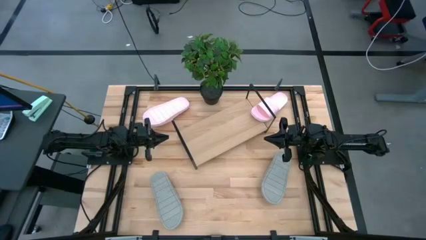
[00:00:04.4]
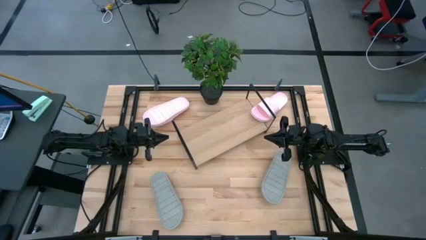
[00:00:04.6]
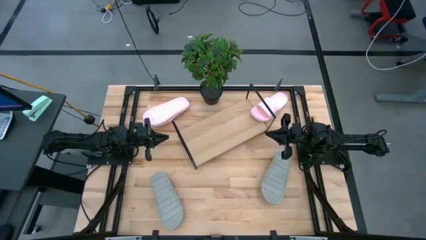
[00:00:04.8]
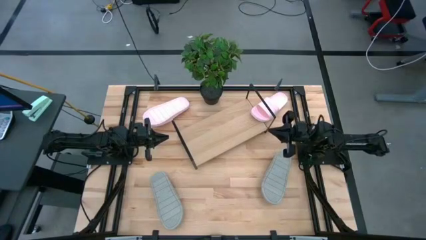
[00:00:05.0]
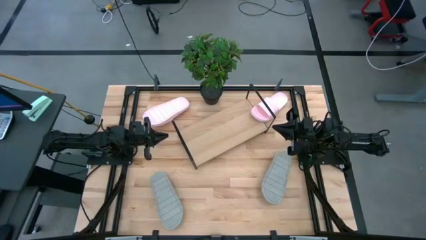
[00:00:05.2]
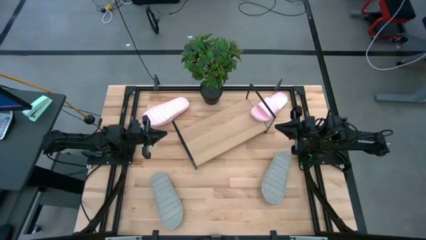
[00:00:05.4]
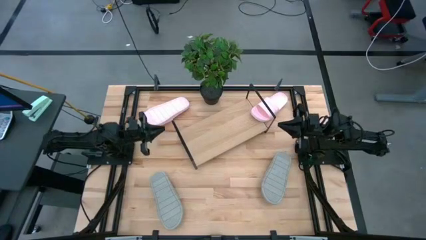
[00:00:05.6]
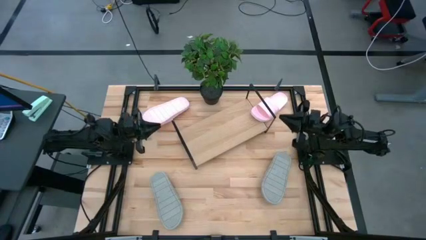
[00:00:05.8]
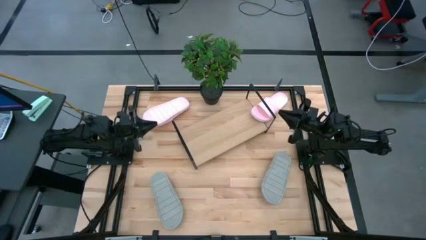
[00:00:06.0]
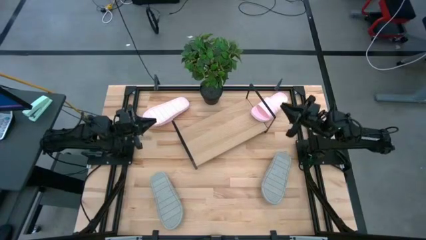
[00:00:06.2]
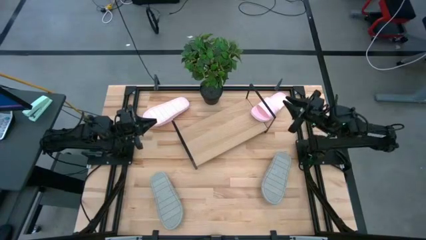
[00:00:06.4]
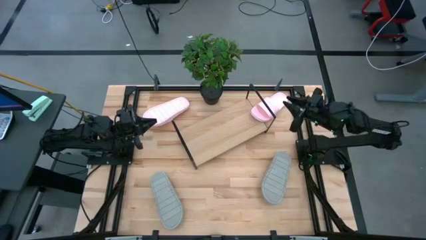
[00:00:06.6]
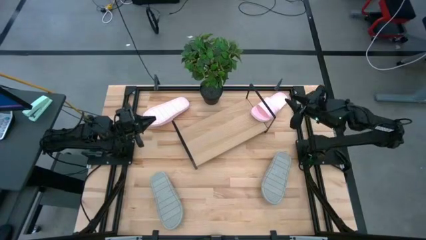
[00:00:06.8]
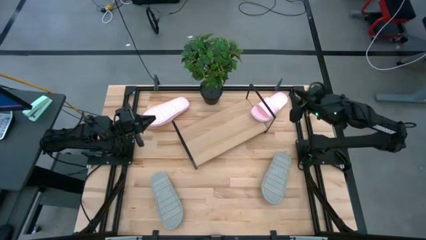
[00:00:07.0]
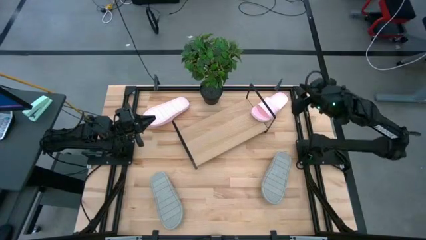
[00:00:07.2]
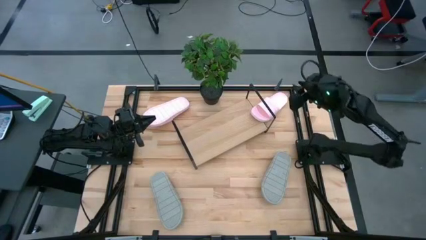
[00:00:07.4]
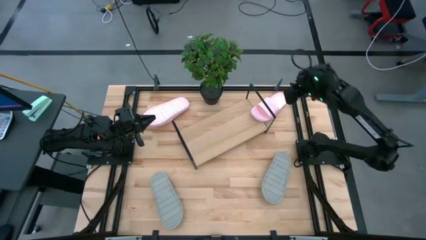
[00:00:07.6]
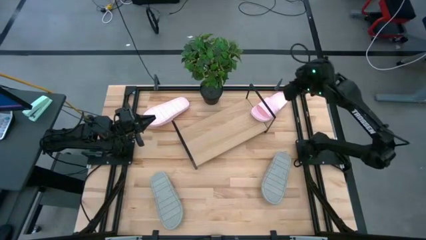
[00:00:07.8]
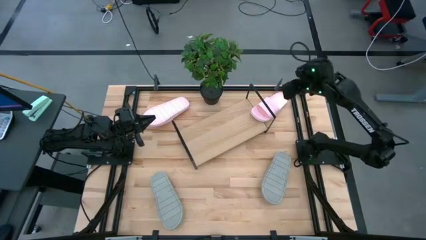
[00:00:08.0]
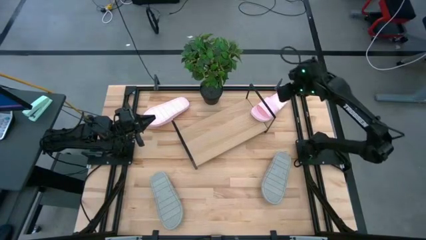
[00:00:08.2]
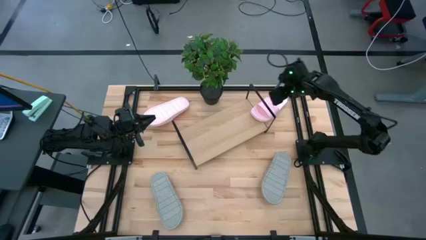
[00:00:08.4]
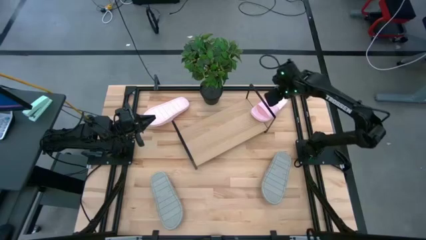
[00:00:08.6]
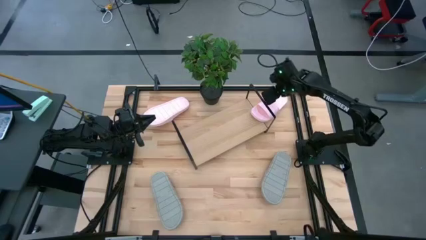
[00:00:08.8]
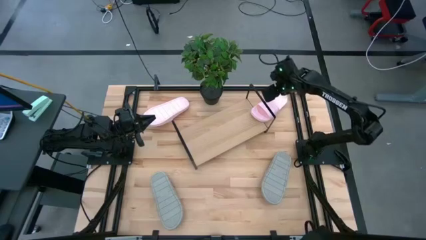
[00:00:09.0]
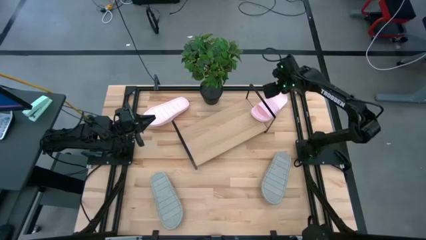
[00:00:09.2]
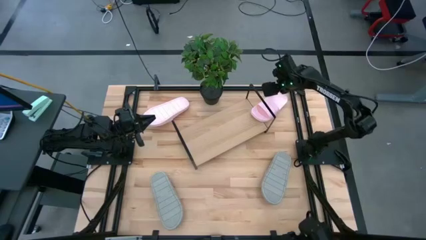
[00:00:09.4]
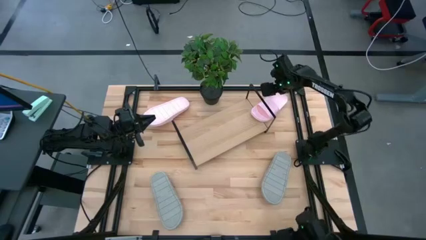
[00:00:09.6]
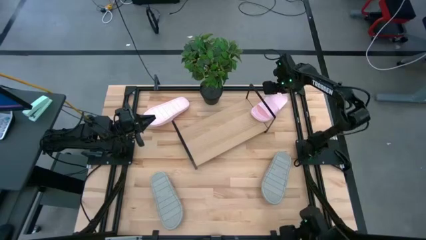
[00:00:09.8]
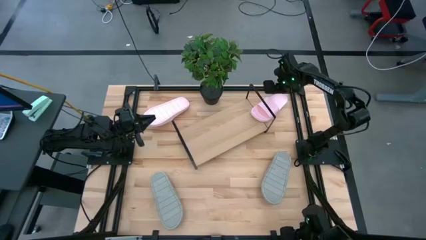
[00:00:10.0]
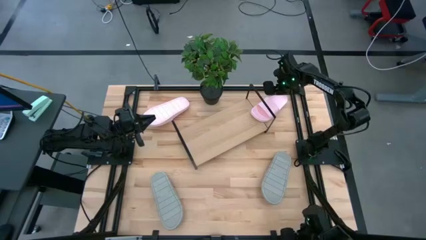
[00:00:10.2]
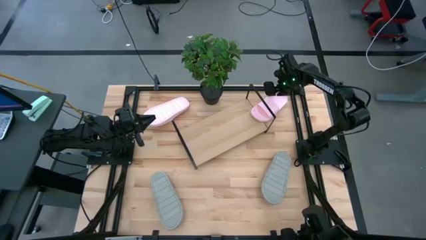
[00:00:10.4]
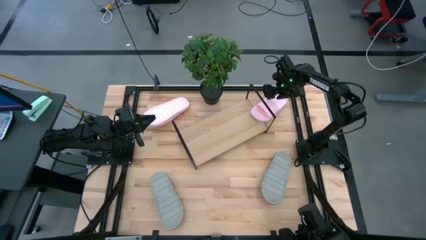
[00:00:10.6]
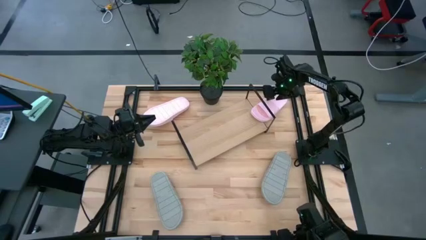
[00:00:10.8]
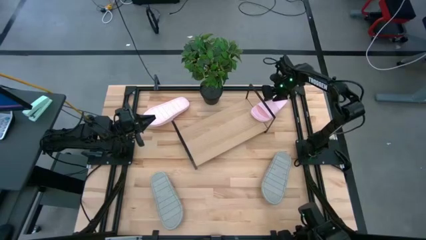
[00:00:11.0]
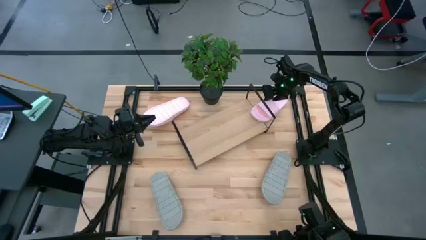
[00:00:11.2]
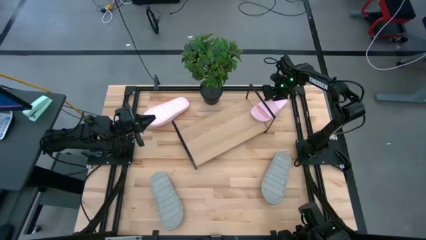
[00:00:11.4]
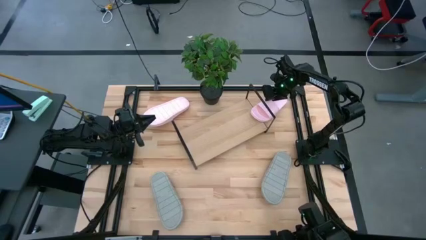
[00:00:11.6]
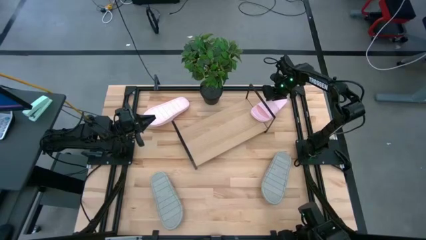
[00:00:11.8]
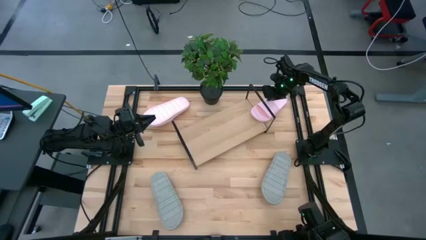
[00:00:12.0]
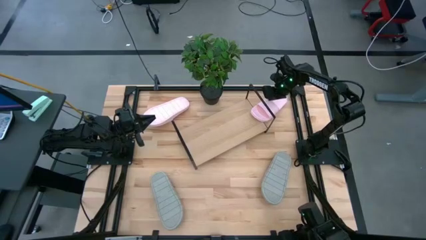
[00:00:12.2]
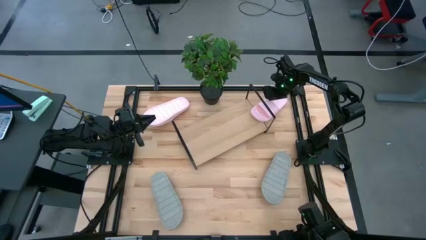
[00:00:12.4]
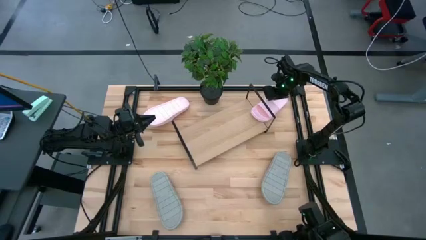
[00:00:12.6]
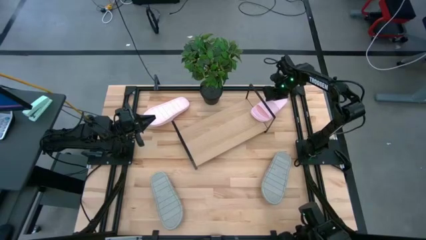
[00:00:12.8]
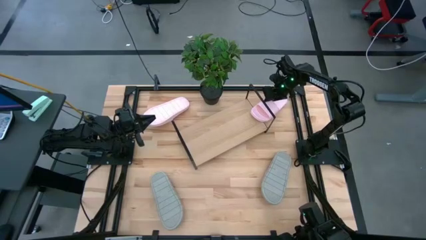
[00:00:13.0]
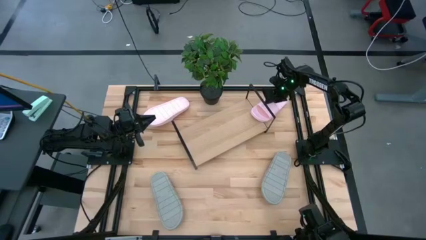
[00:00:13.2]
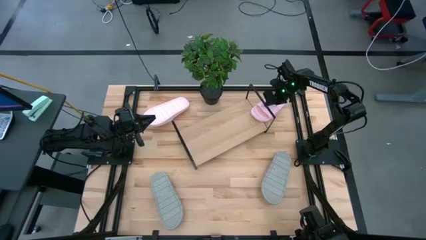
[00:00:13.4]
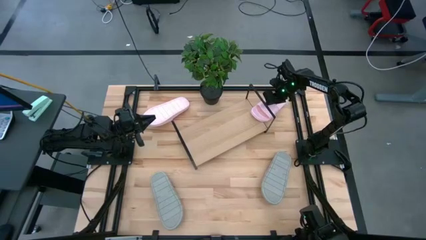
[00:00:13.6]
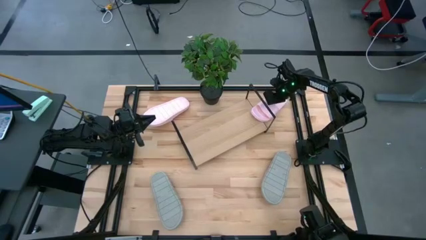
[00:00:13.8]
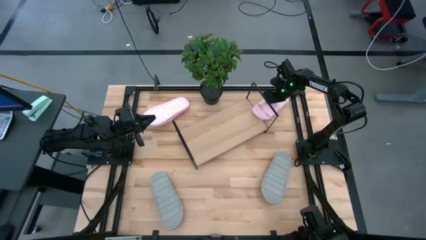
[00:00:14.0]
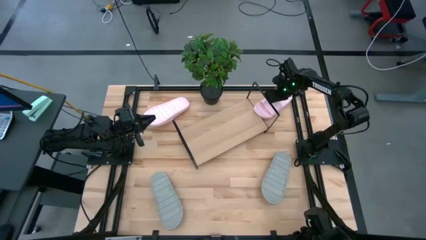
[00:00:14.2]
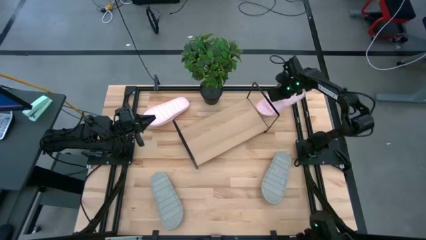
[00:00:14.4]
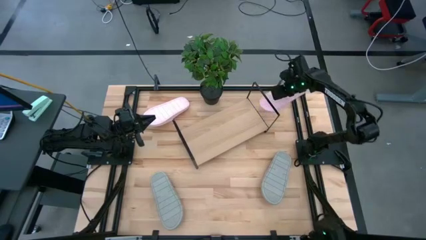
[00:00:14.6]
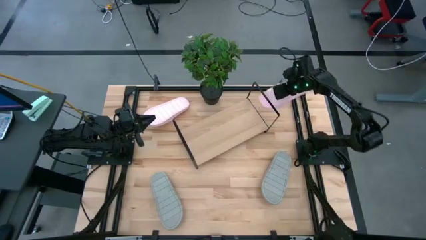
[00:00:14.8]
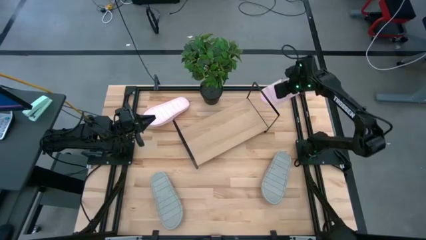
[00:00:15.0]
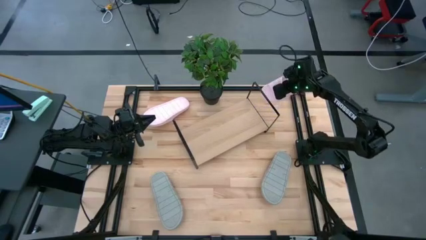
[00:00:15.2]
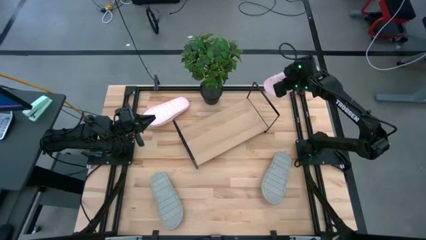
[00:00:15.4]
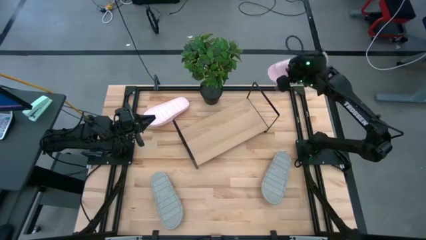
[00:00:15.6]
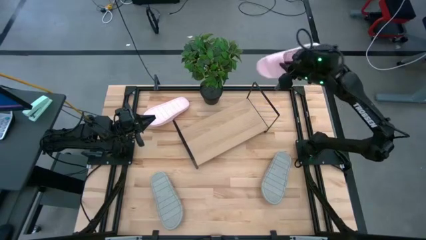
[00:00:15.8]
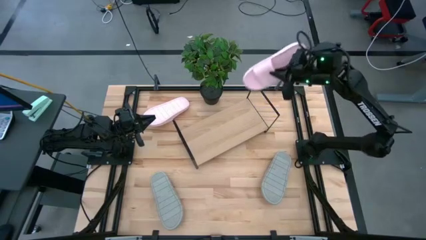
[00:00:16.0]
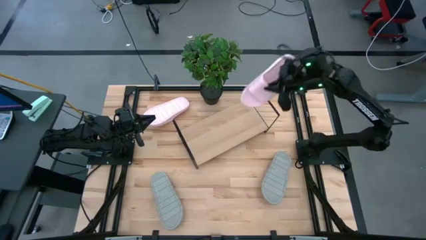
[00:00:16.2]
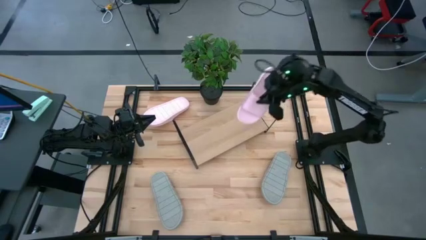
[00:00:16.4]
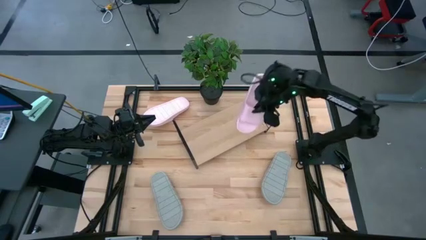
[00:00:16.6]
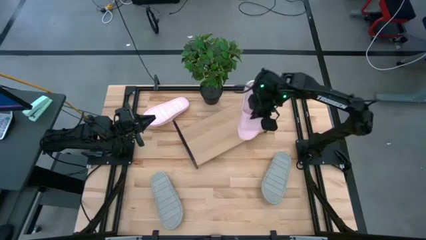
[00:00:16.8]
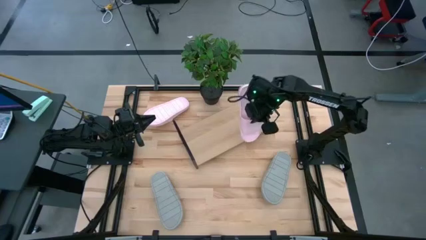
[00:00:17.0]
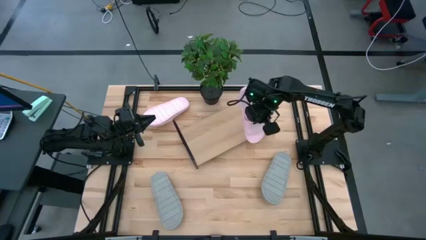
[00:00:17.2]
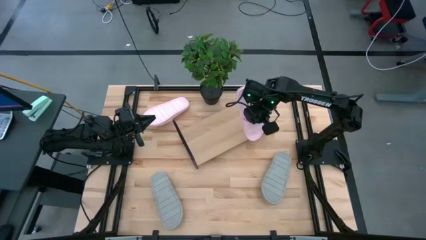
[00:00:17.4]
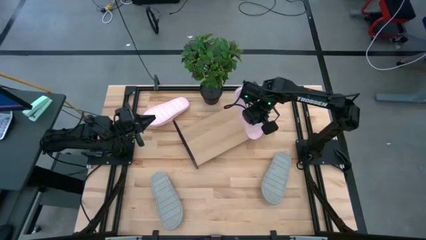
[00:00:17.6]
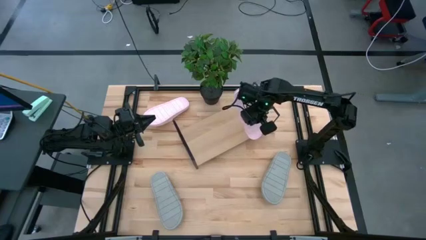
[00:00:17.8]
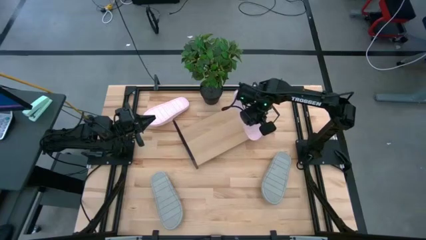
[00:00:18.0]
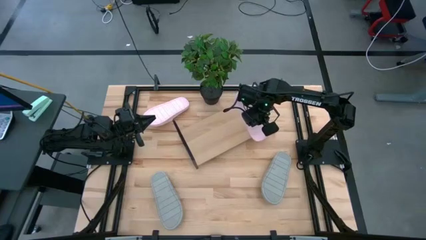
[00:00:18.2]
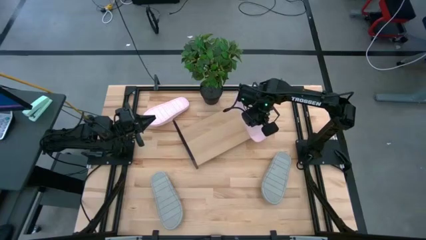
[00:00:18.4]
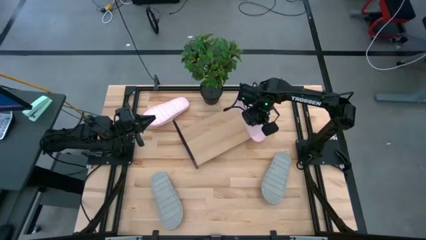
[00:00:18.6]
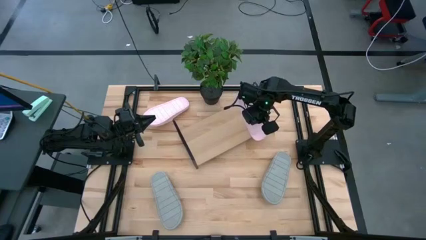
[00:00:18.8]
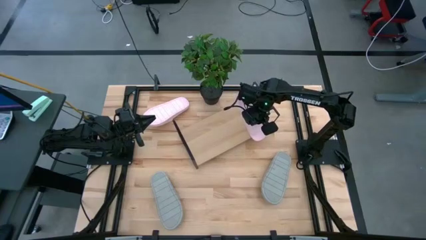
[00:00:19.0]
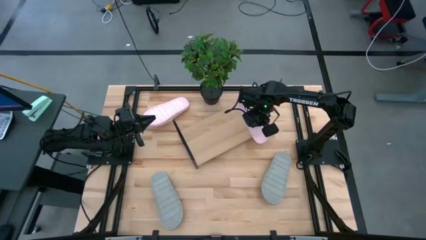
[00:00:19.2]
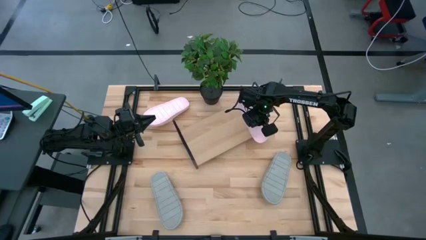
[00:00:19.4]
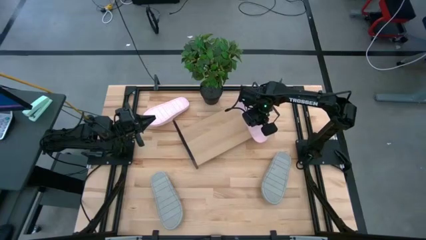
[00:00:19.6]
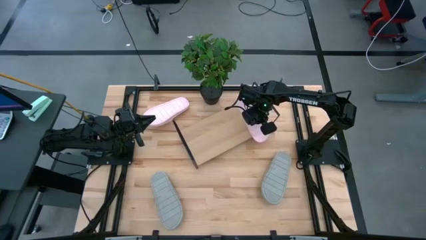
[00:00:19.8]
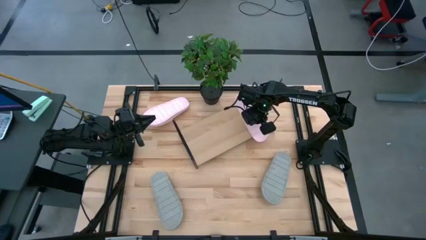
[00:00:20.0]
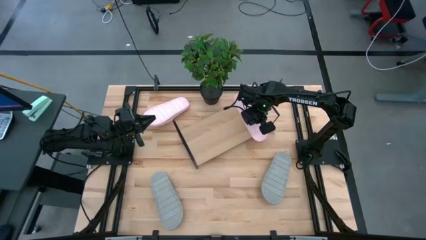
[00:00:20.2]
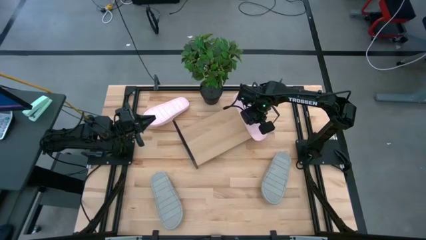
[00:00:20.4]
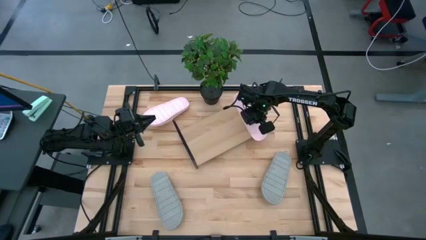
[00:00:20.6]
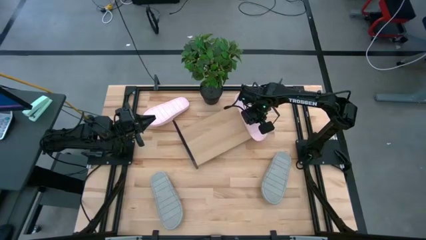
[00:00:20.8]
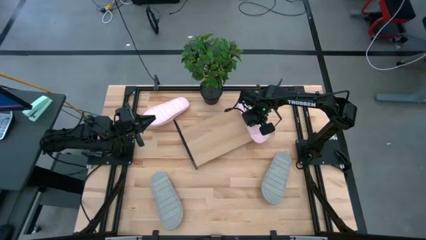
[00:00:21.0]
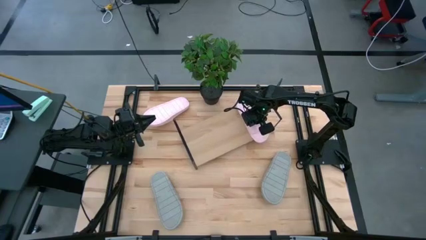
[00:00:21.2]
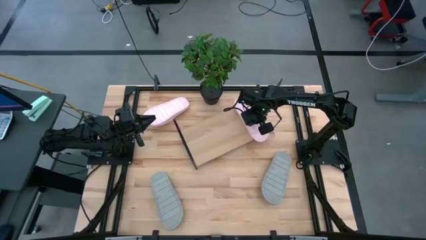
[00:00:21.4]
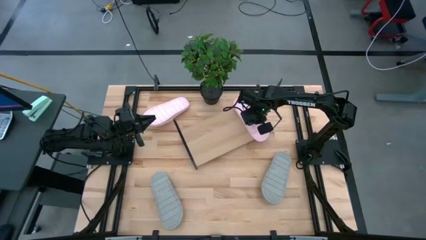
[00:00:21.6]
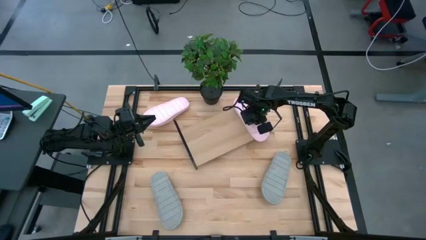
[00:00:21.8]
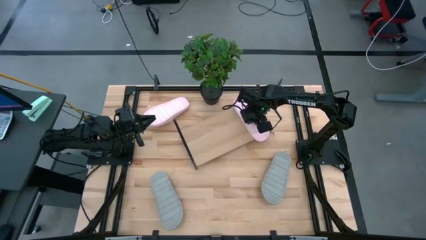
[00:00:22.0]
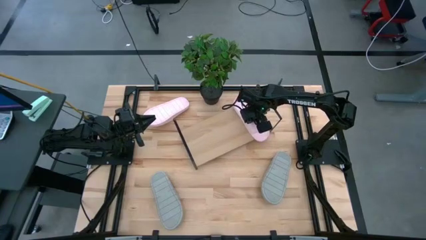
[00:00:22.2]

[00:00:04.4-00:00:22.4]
Task: Pick and place slides into the shelf
Put the right pink slipper on the shelf
